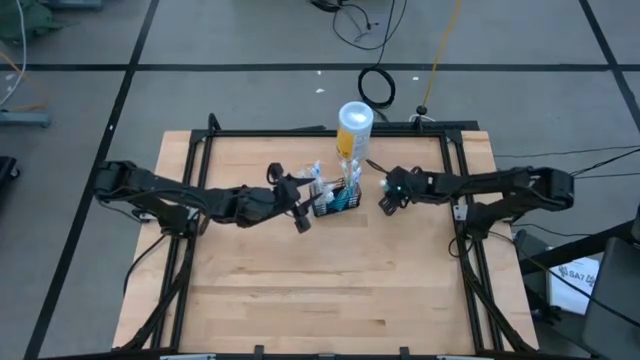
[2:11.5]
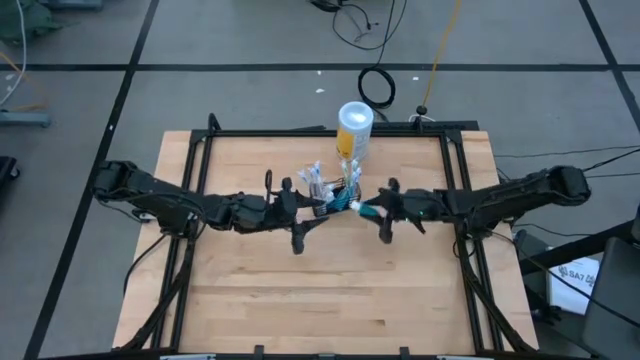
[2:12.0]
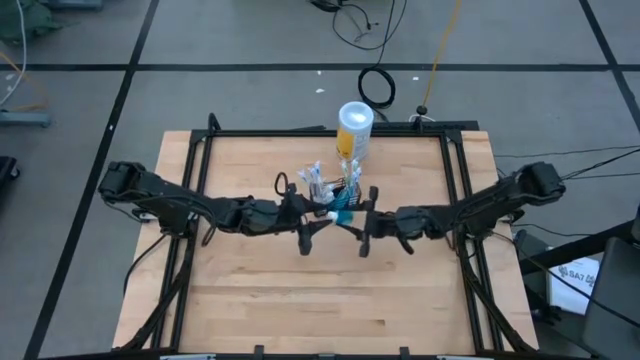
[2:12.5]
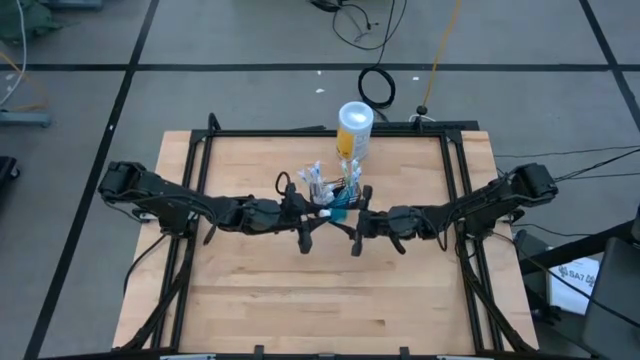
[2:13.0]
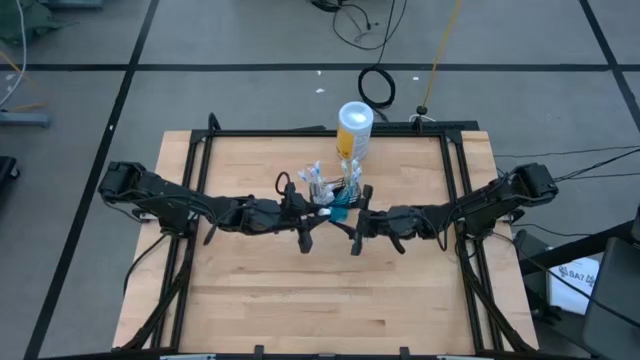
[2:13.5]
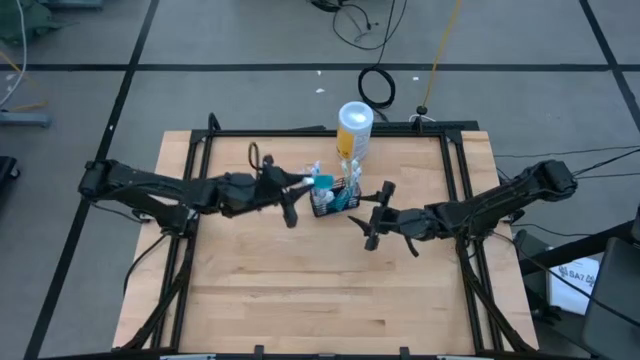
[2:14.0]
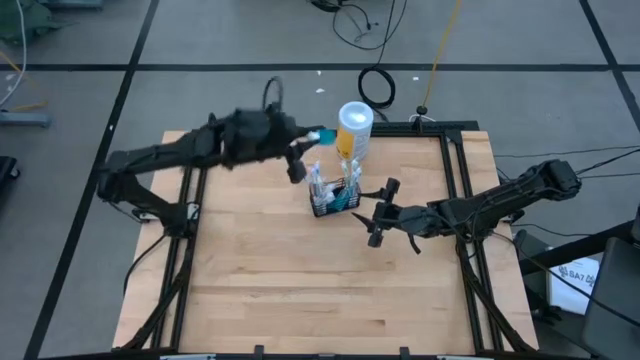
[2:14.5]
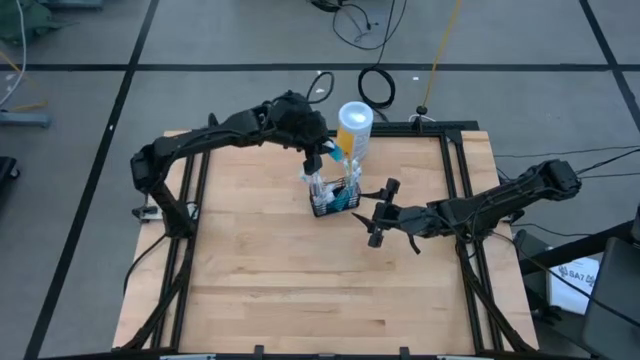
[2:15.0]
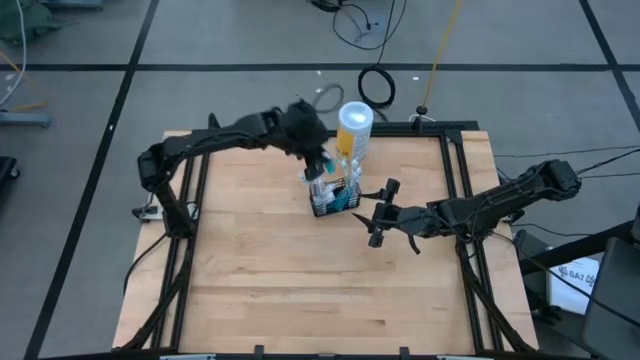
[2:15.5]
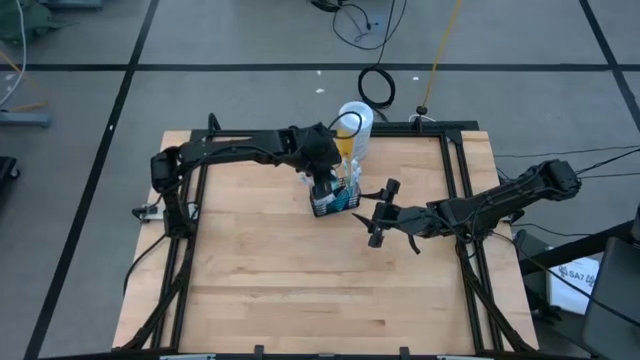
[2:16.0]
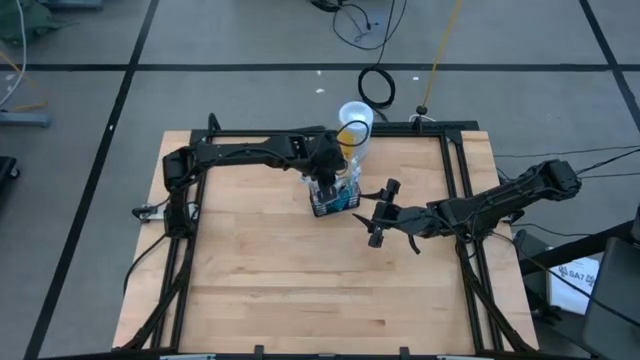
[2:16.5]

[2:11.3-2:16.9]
Task: Pick & Place toothbrushing station
Put the blue mouthwash into the black wire organizer

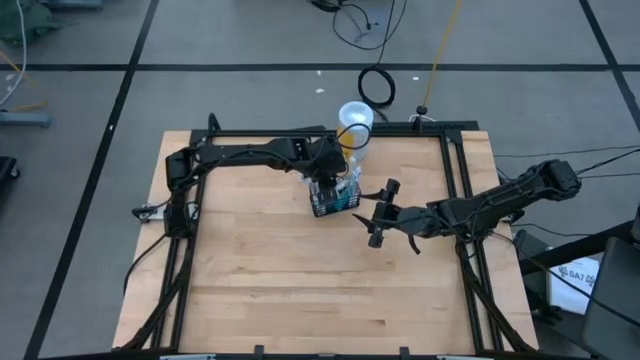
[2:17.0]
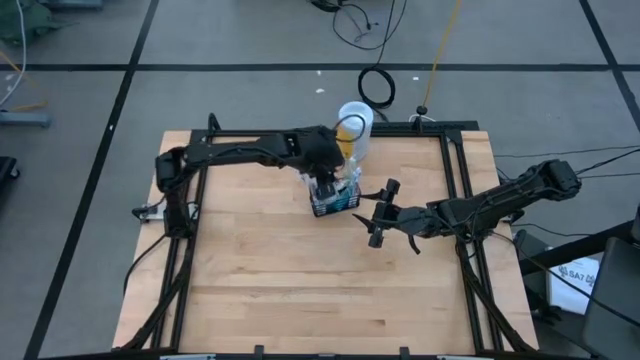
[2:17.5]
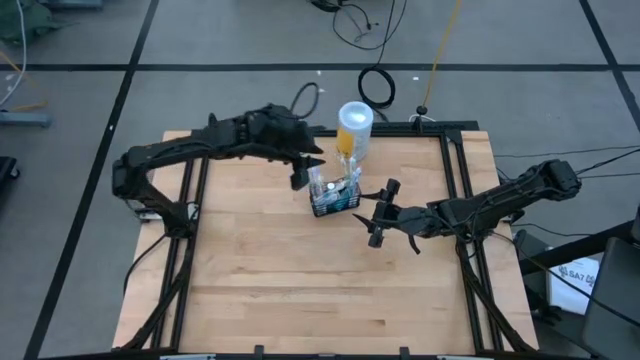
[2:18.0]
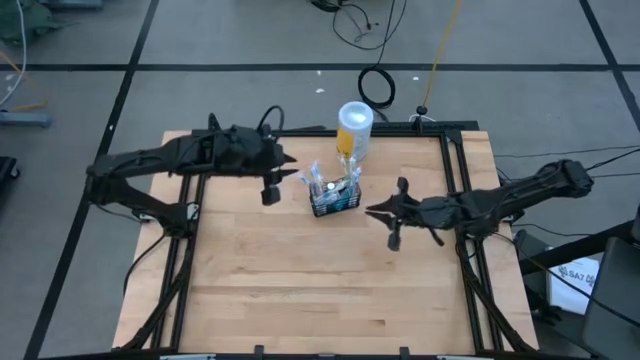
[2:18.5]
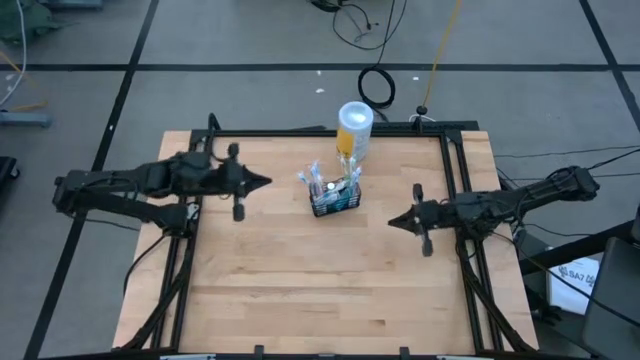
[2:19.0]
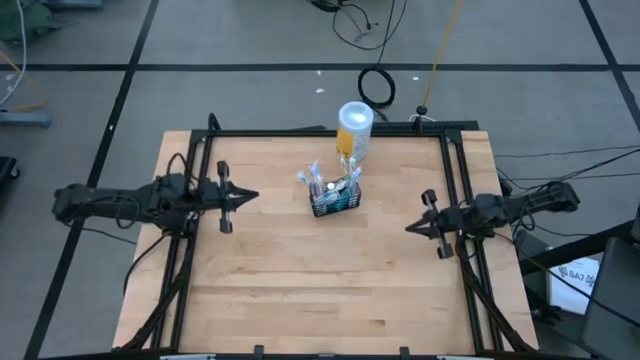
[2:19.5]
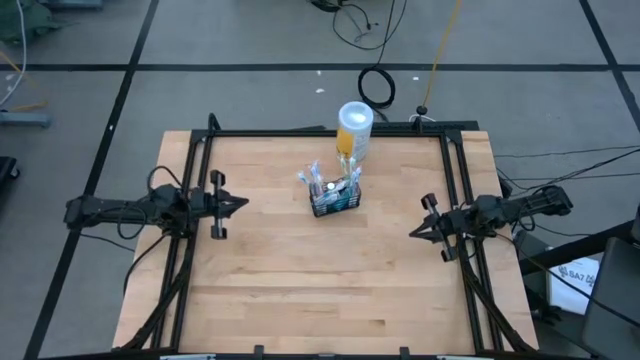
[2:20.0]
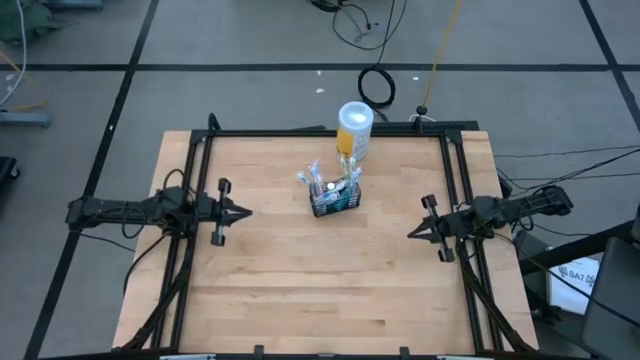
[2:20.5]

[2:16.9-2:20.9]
Return to Home Position

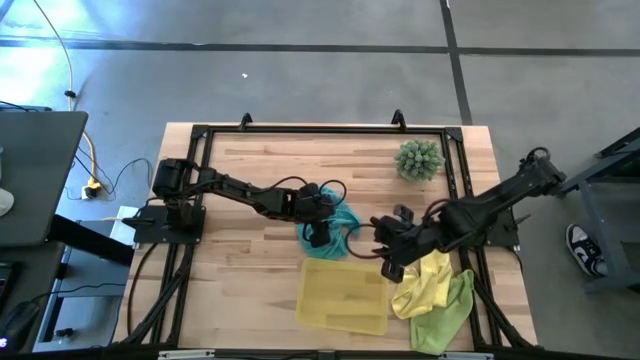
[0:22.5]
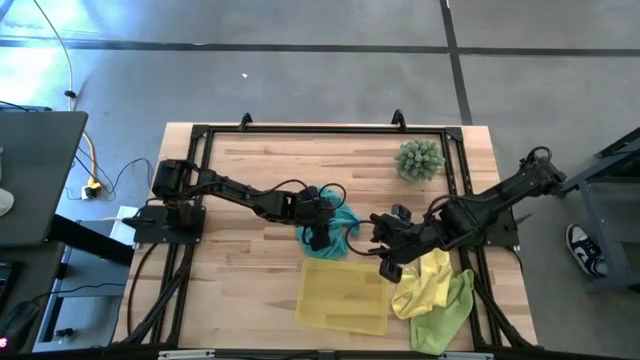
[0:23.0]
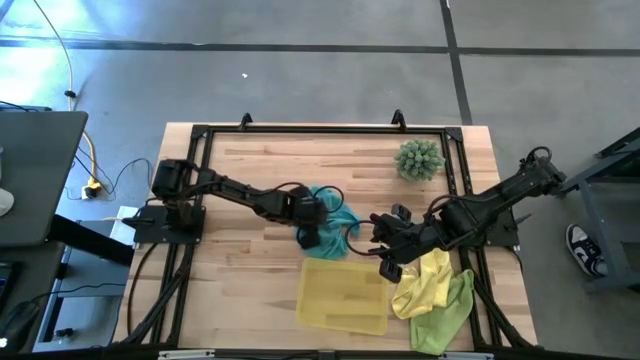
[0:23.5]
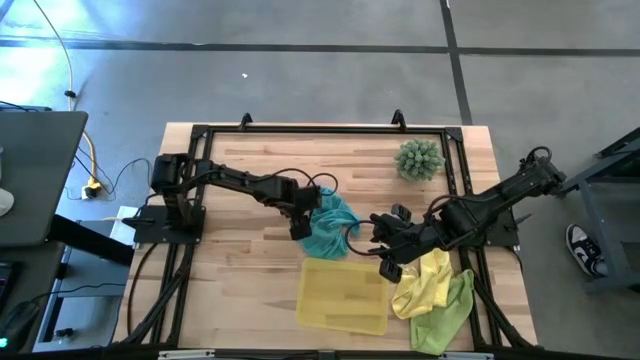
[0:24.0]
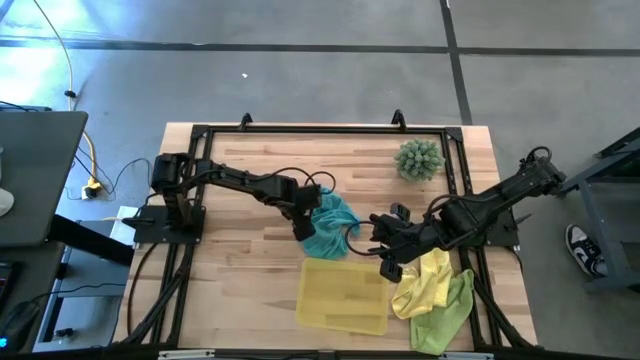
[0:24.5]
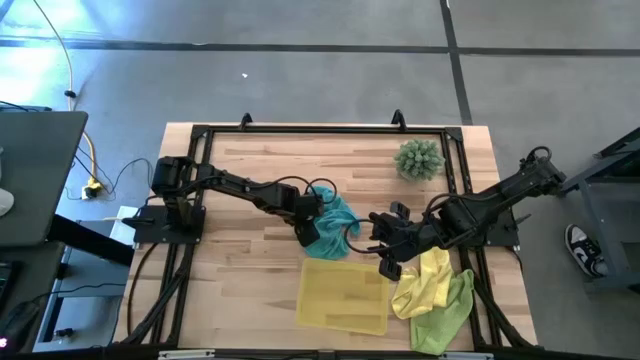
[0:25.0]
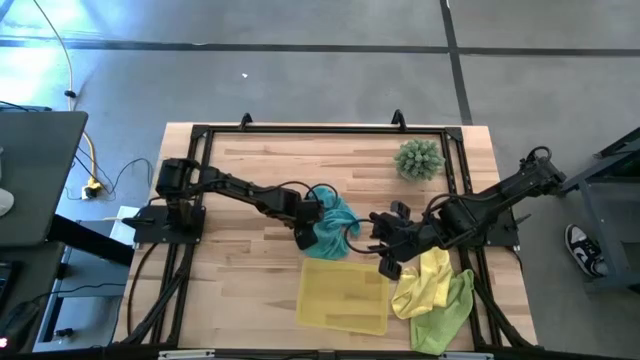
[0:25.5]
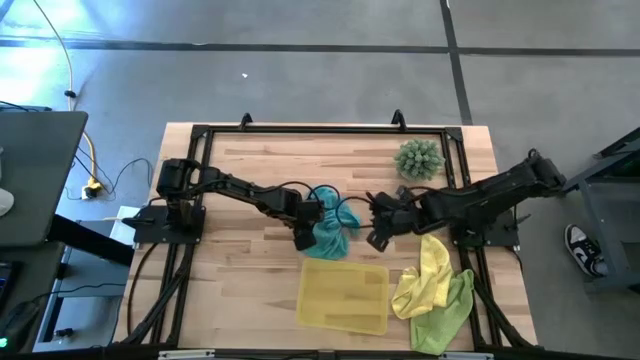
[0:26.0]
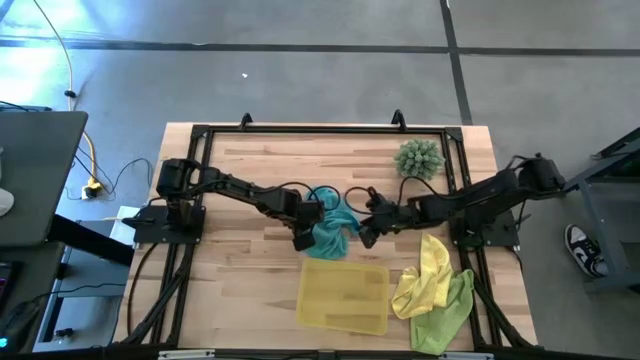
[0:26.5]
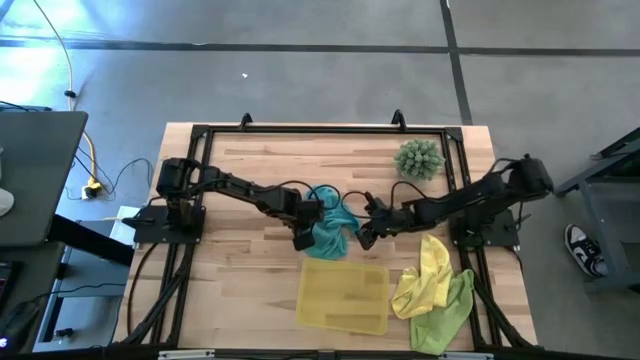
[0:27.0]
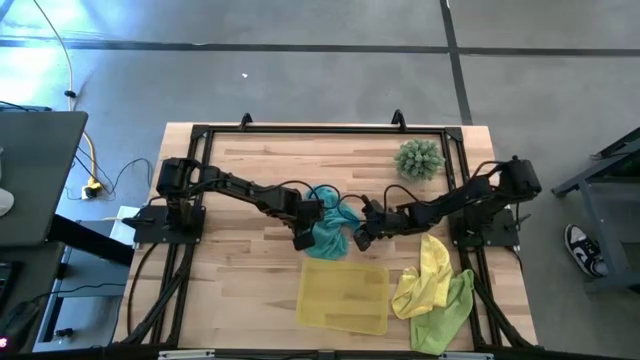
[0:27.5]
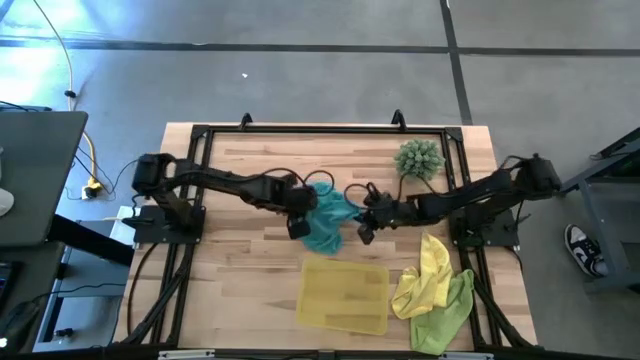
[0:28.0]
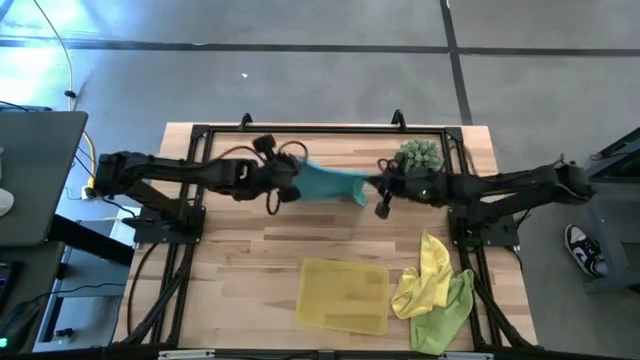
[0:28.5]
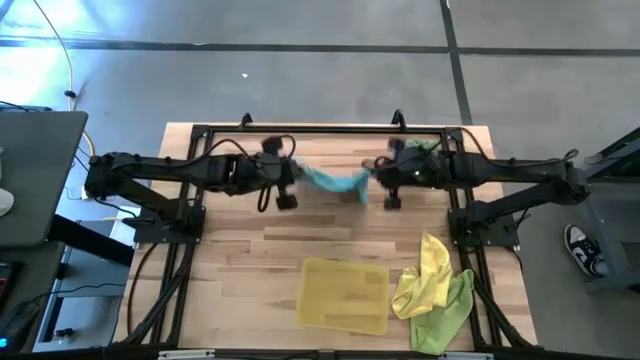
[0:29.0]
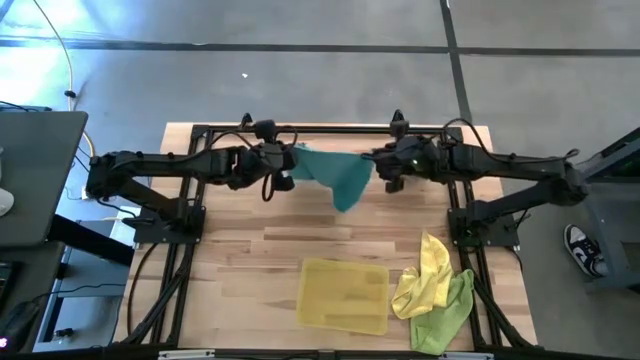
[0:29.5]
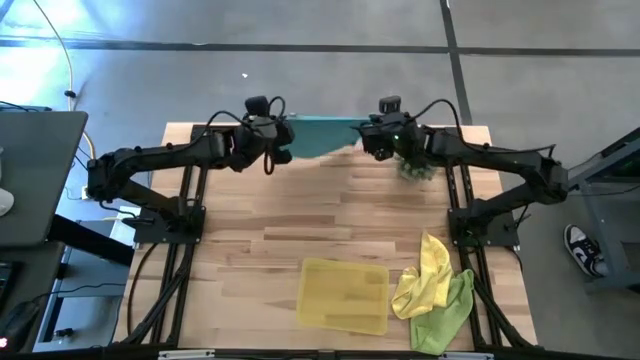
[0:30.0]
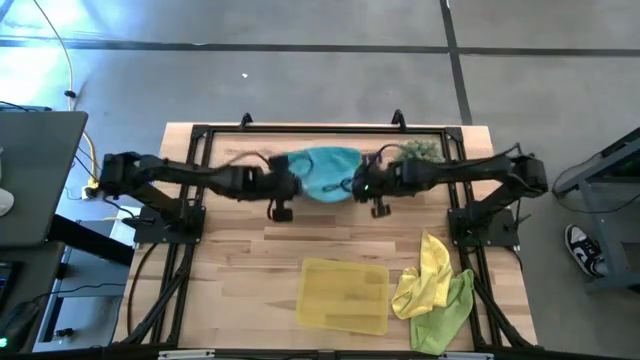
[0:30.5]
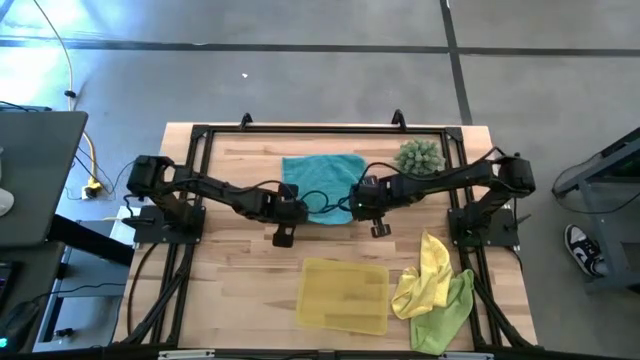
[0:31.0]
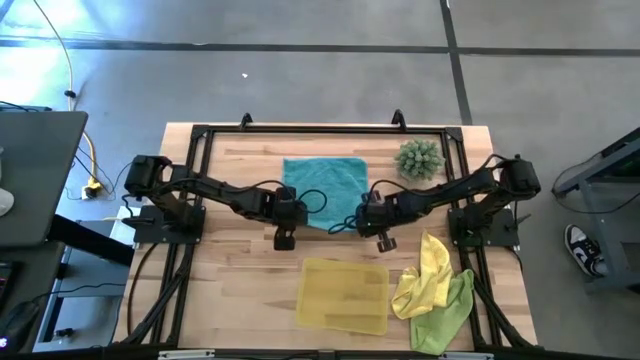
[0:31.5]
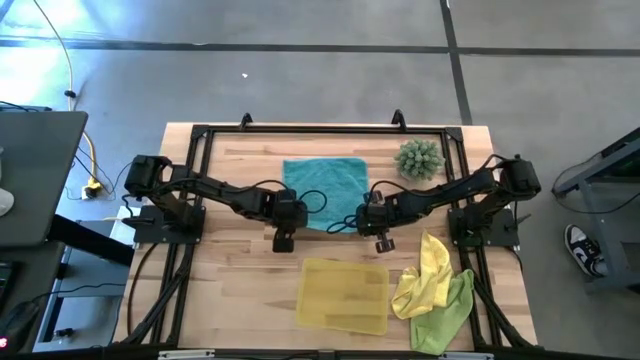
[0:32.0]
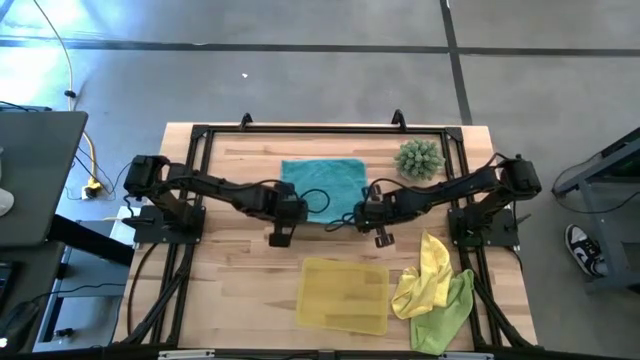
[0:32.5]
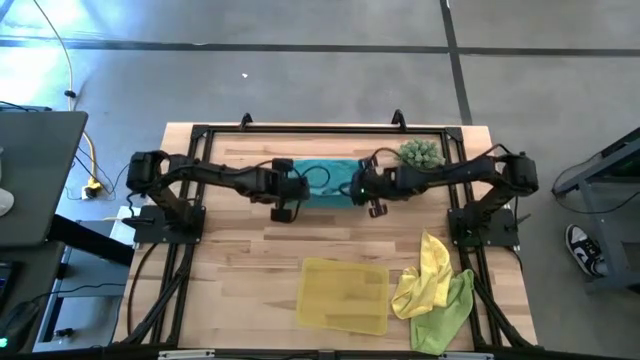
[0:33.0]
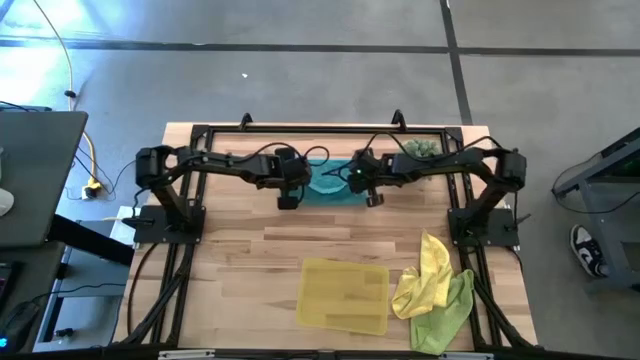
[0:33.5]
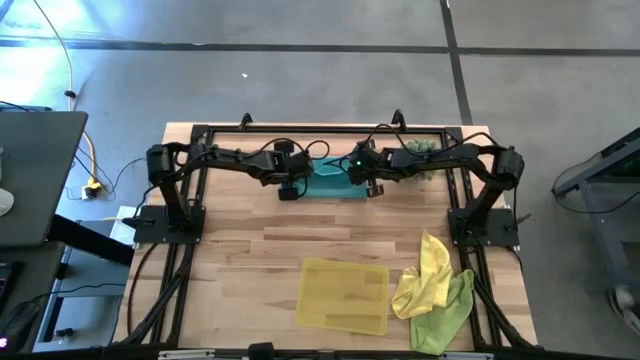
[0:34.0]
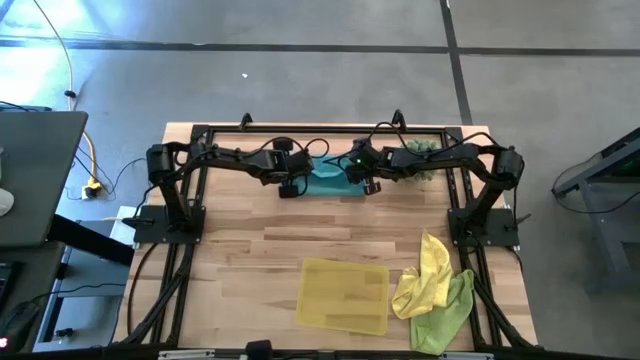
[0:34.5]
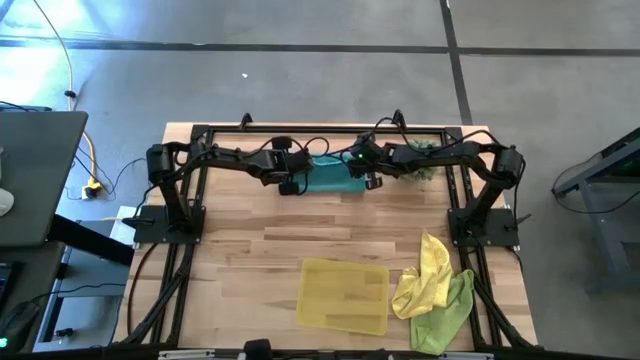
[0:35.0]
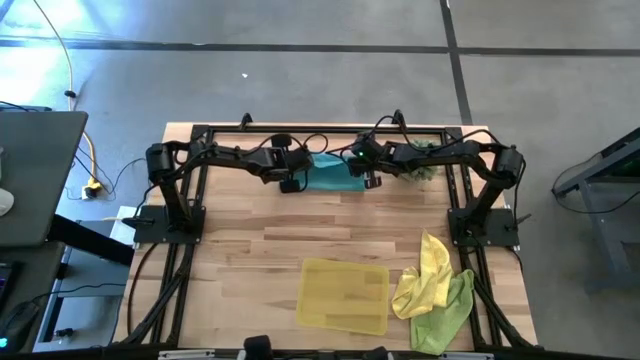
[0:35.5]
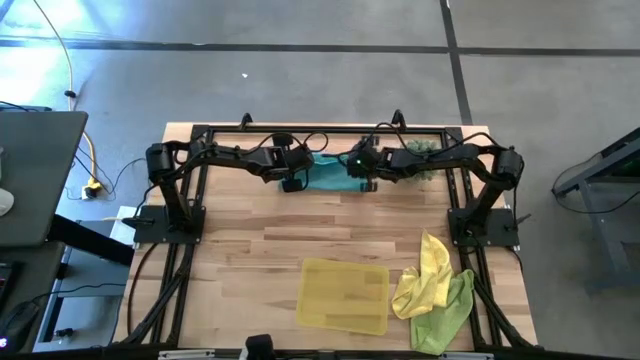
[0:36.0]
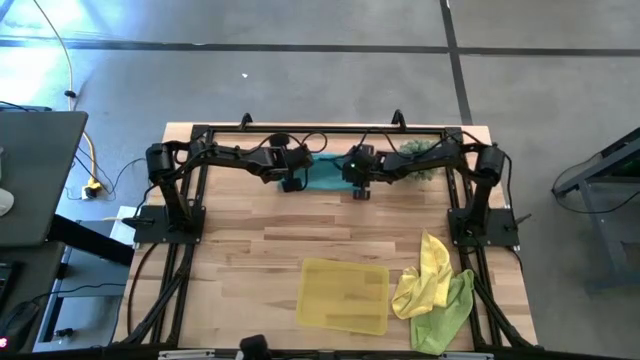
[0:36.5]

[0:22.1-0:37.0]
Task: Roll microfiber towels into tight, uniform cylinder then place into a basket
Fold the blue towel
